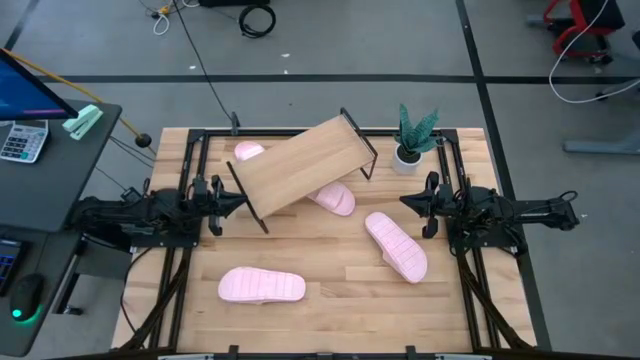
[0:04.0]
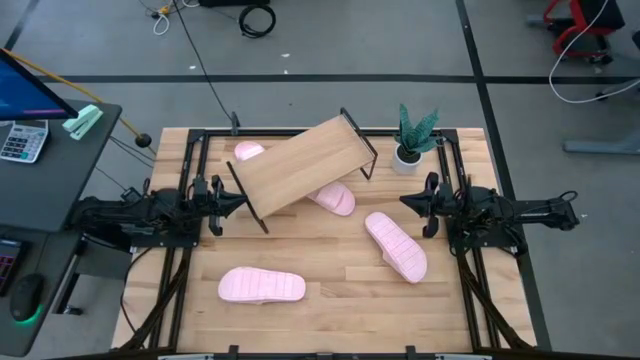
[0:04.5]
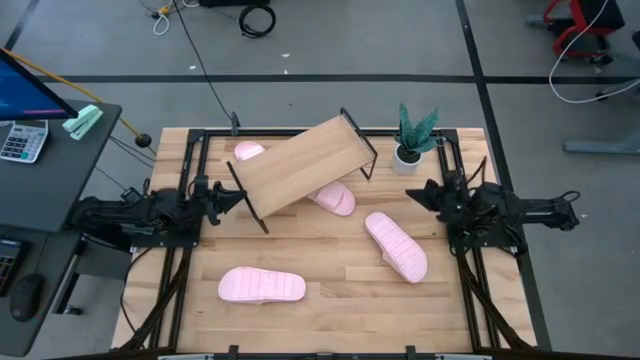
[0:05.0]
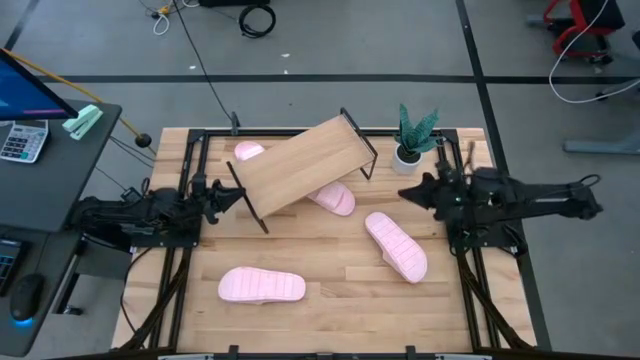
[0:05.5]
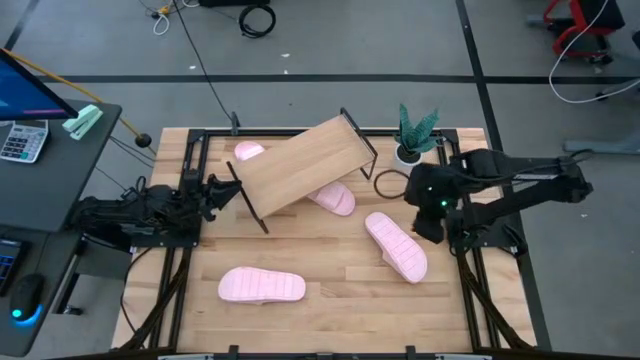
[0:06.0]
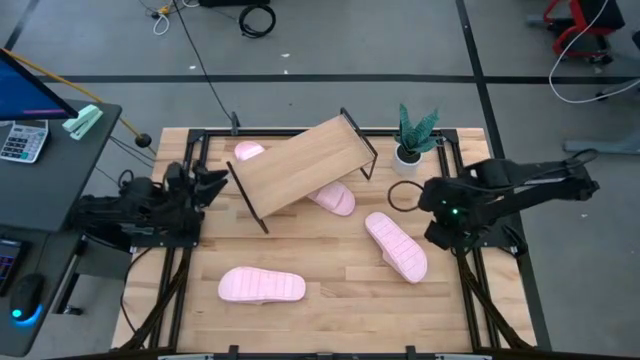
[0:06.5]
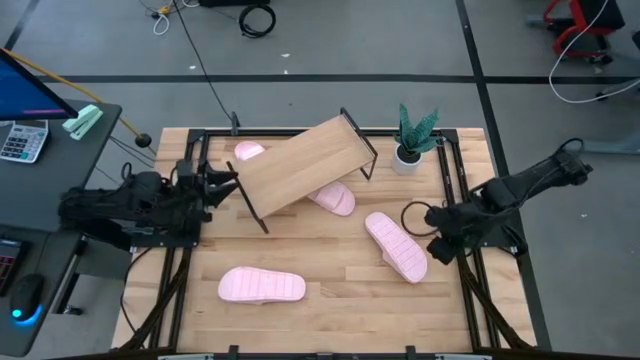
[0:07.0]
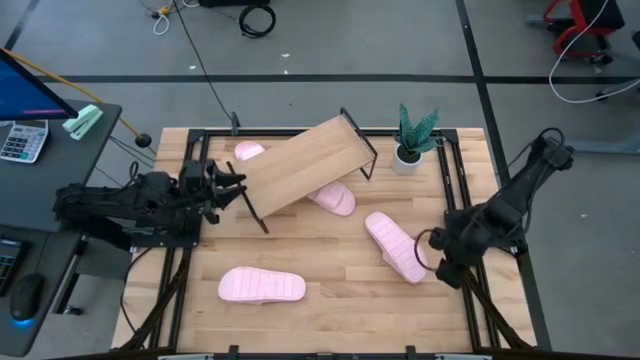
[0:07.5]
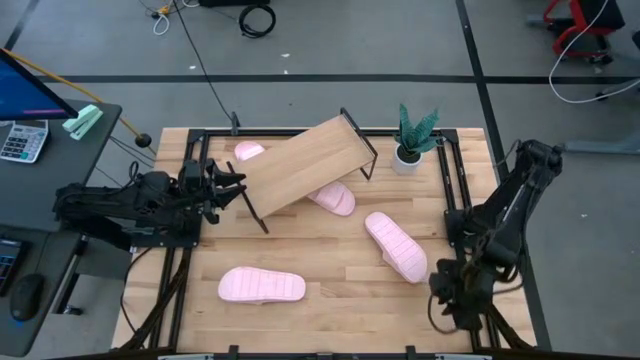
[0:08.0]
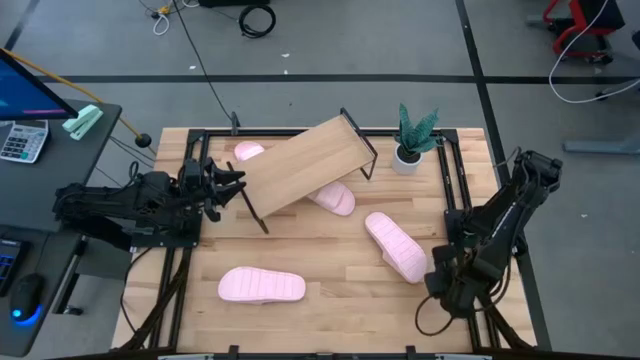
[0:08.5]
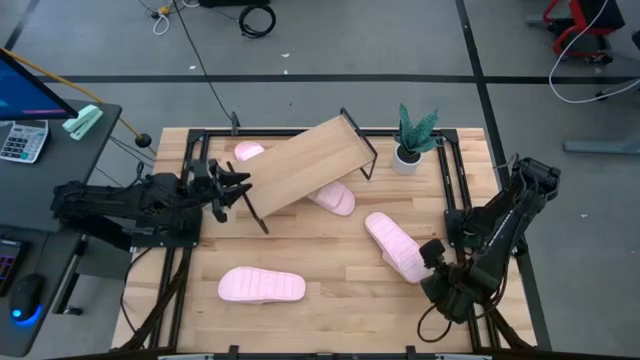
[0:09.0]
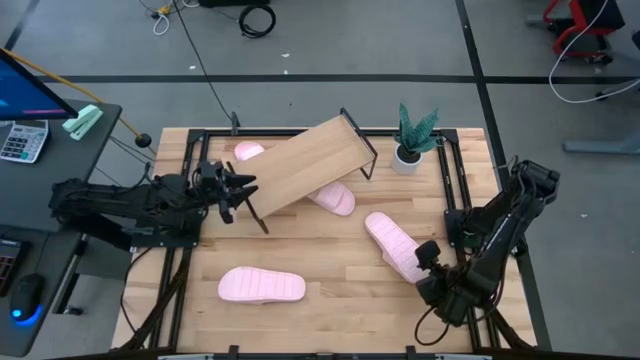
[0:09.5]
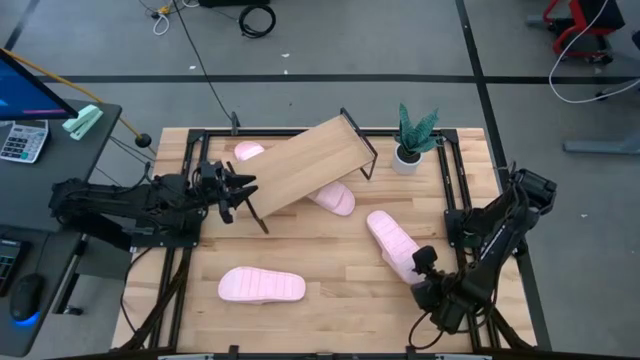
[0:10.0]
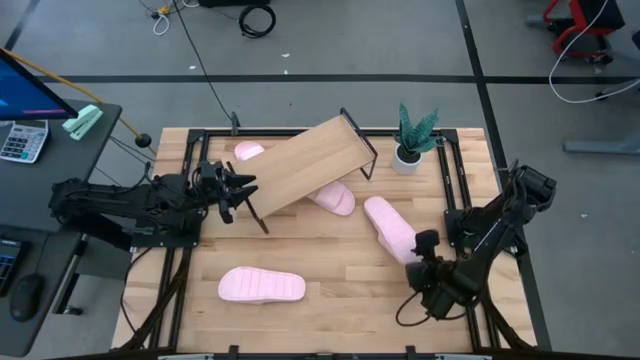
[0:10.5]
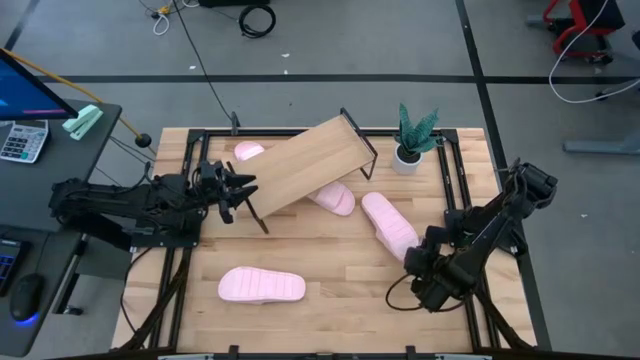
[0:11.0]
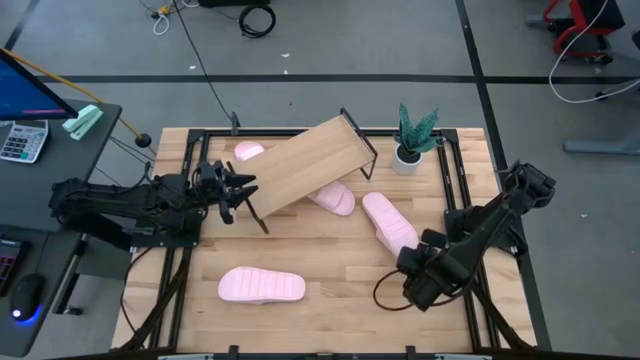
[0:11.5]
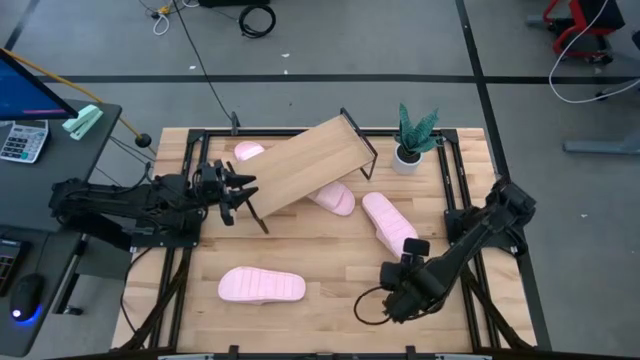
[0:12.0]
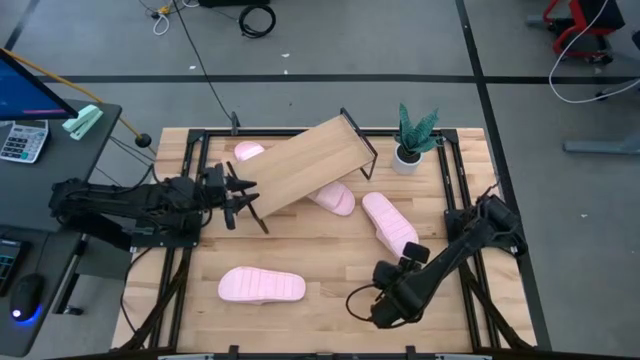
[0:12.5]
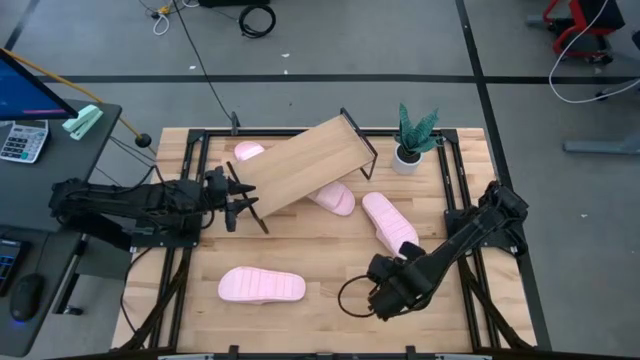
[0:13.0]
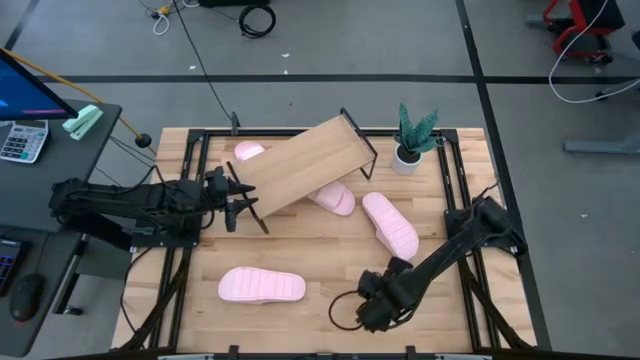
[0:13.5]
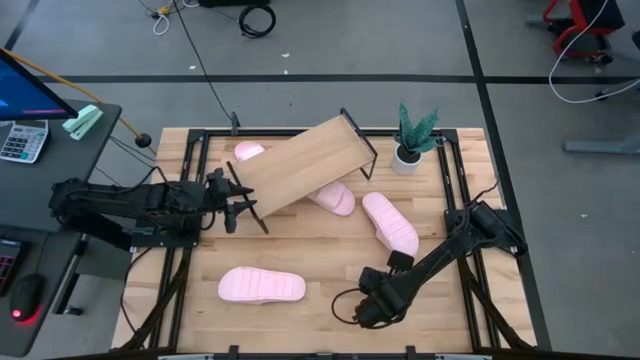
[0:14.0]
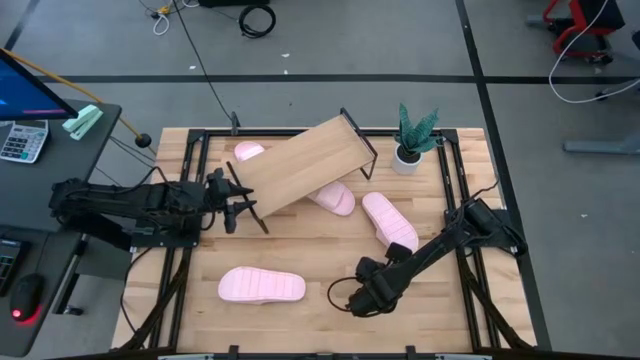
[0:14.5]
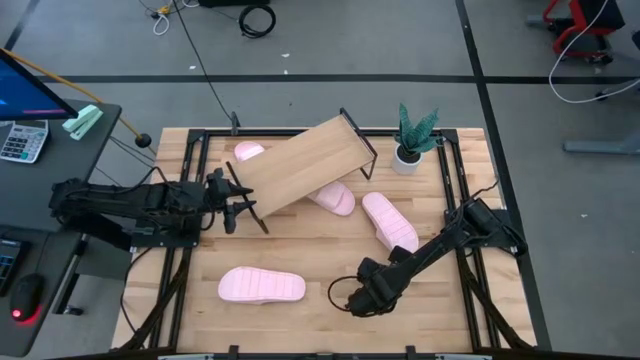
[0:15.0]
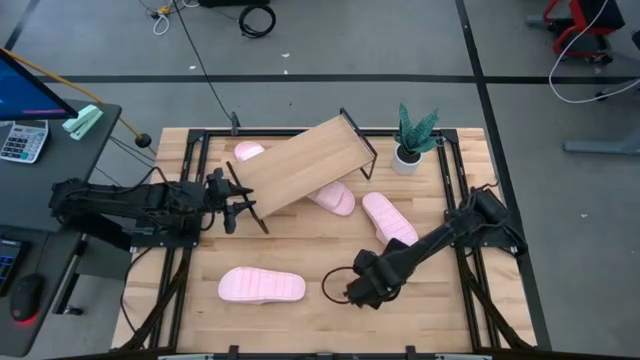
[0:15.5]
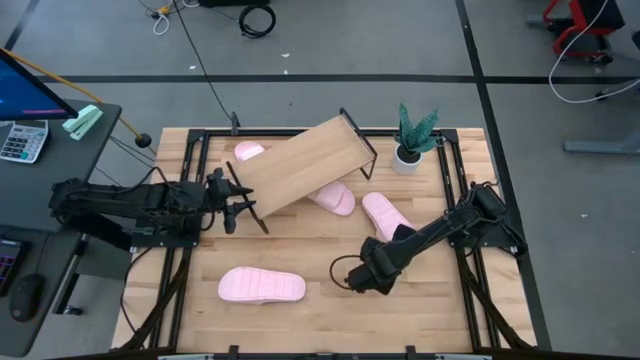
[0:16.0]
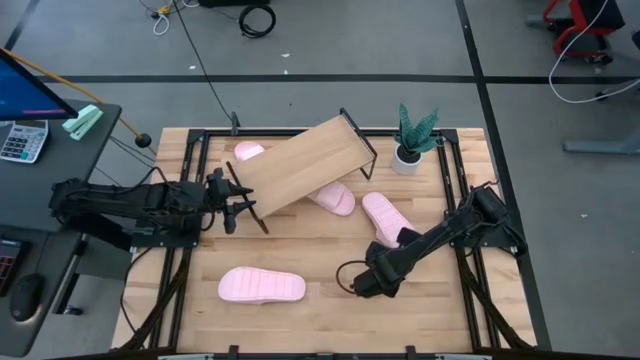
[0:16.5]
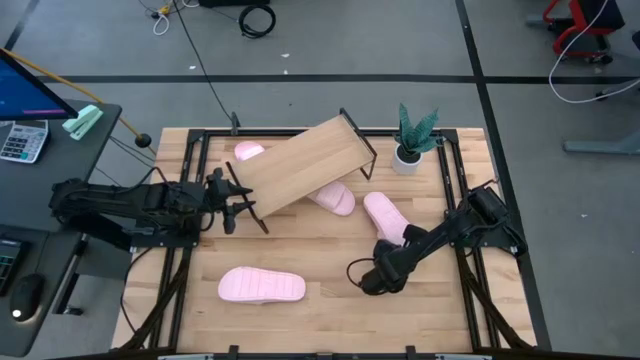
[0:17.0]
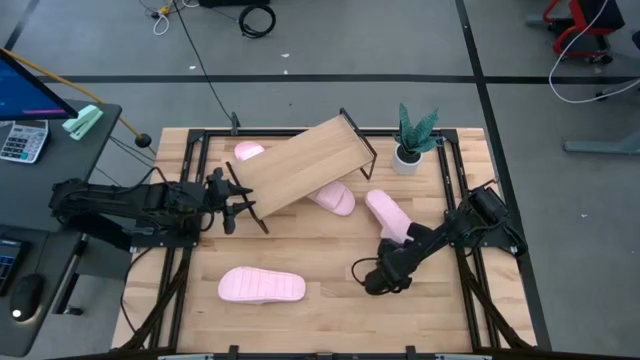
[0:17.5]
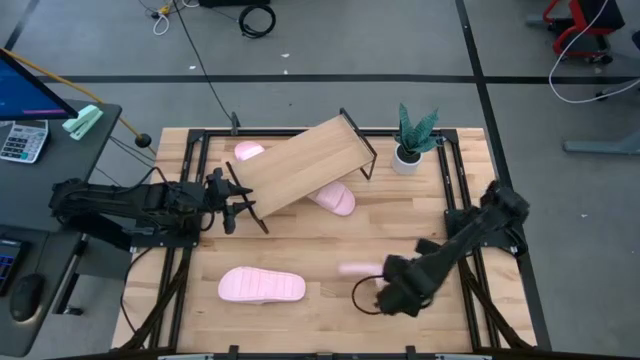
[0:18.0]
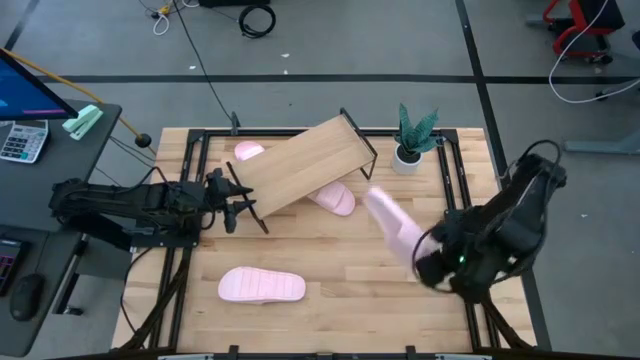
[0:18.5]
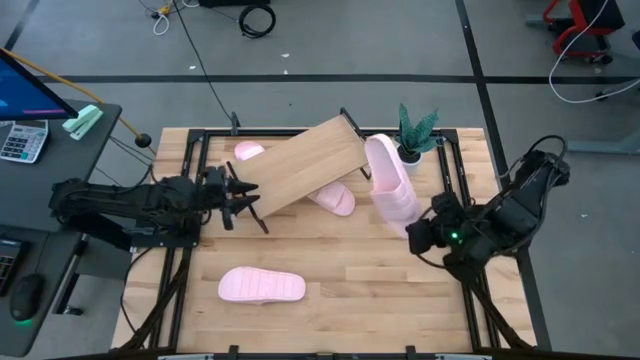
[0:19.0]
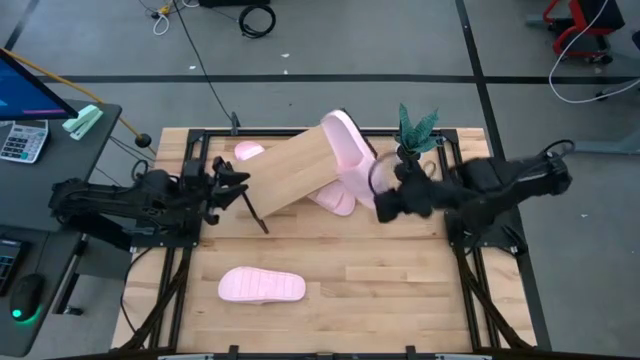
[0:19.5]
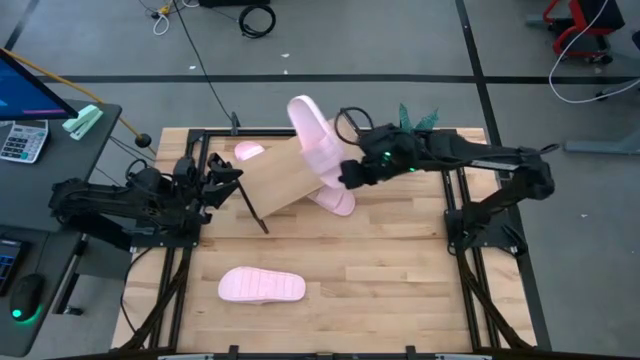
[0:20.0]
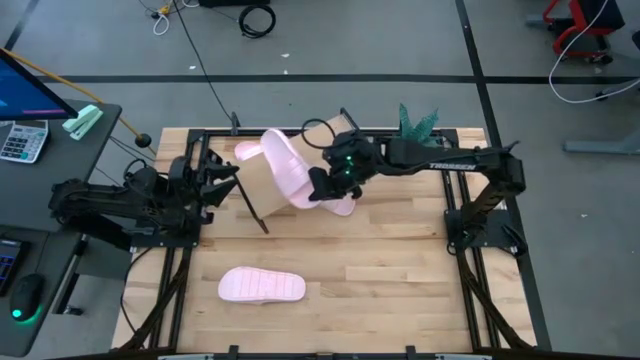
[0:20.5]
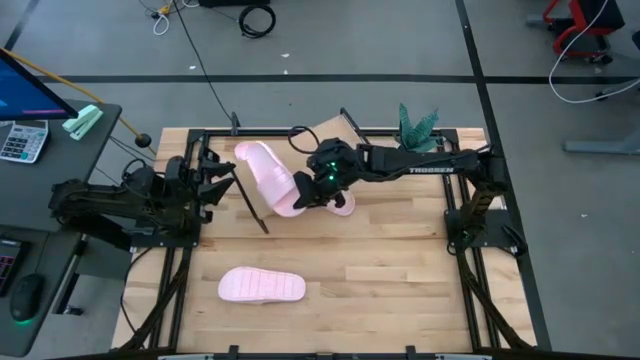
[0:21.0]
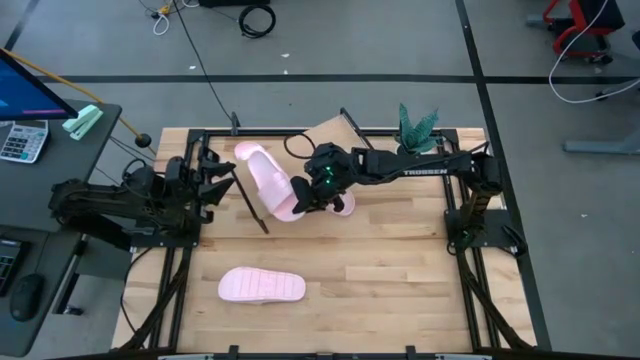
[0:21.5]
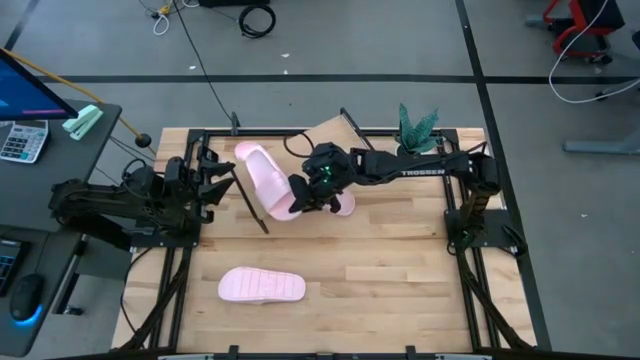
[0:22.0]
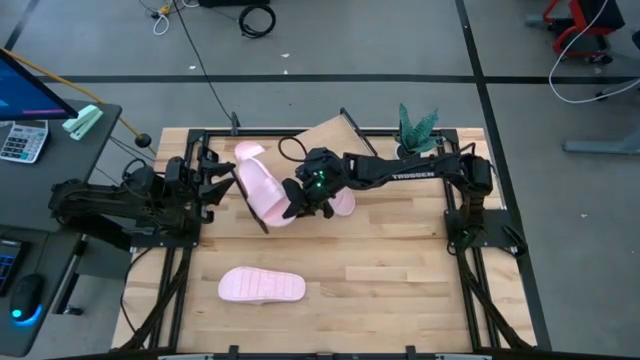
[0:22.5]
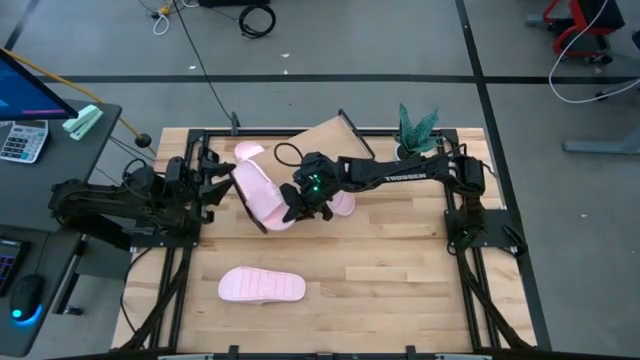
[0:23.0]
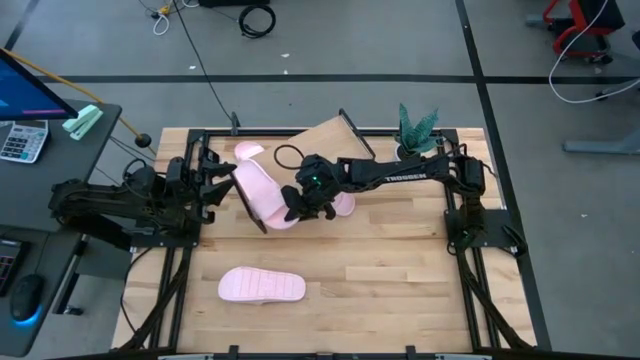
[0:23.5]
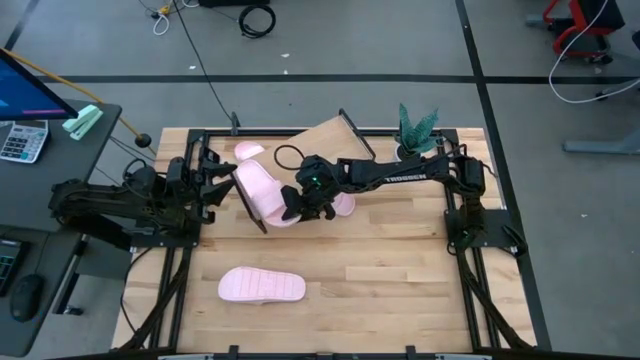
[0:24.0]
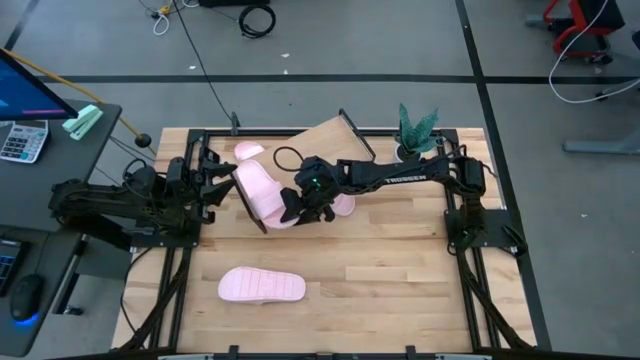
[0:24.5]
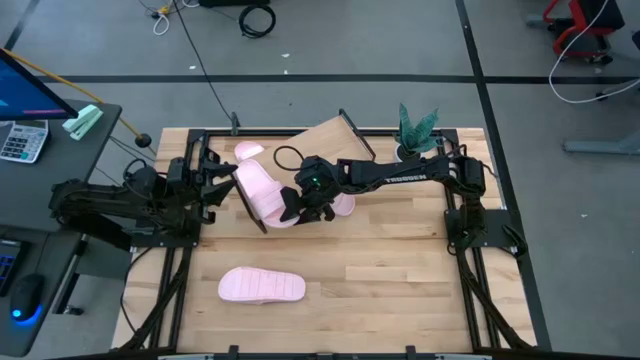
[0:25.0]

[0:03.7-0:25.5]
Task: Pick and place slides into the shelf
Put the pink slipper on the shelf
